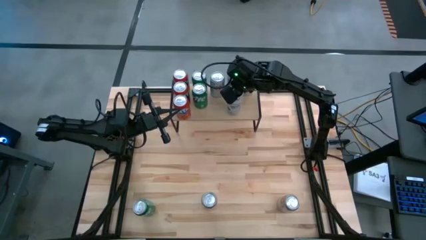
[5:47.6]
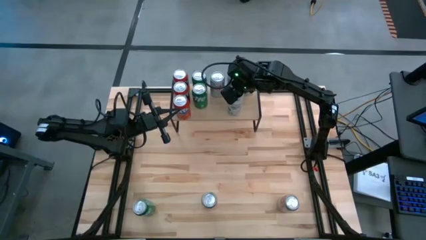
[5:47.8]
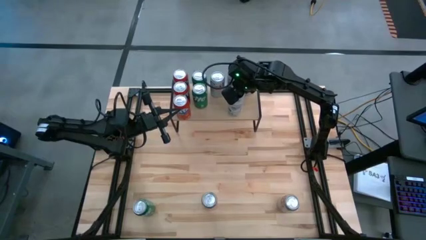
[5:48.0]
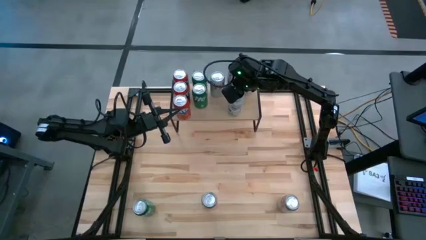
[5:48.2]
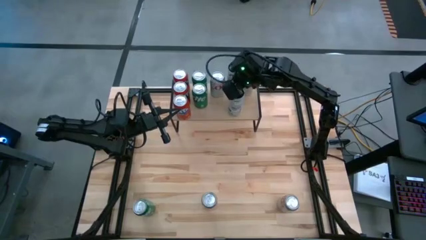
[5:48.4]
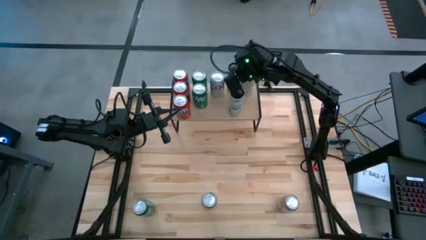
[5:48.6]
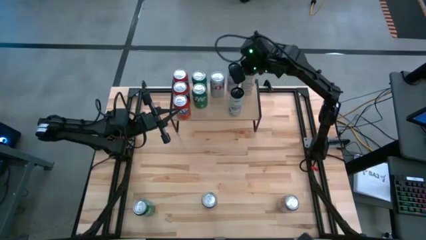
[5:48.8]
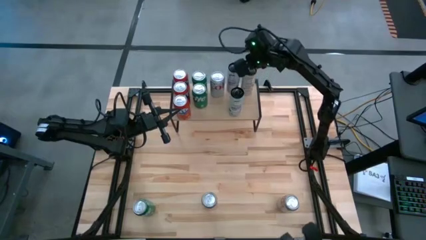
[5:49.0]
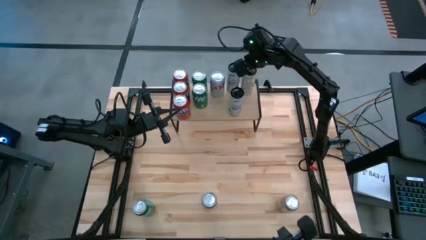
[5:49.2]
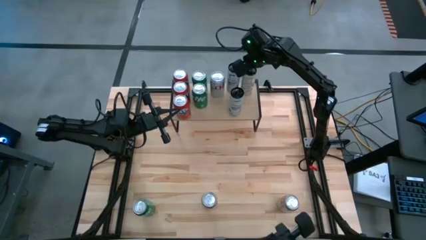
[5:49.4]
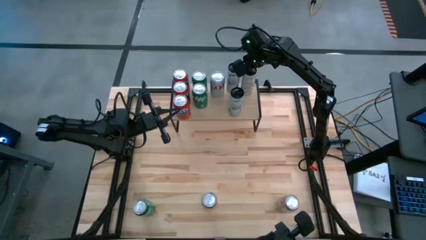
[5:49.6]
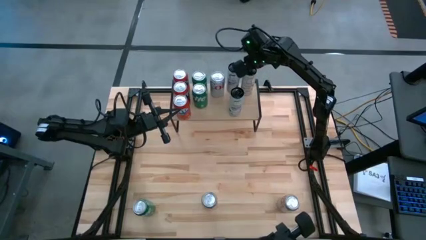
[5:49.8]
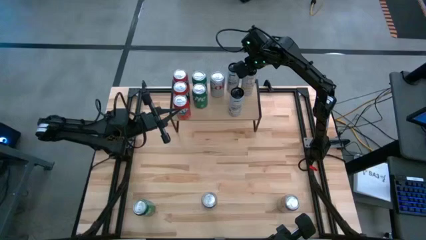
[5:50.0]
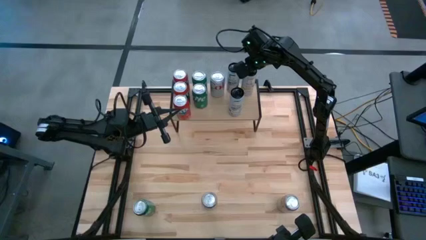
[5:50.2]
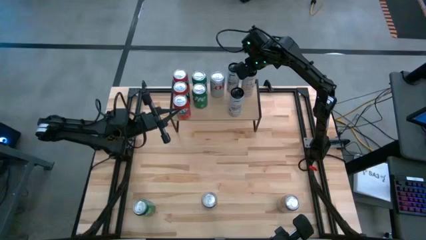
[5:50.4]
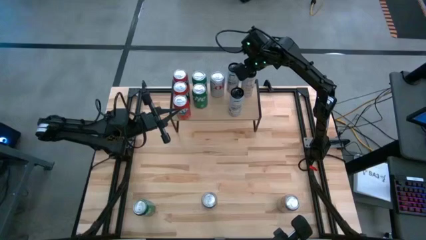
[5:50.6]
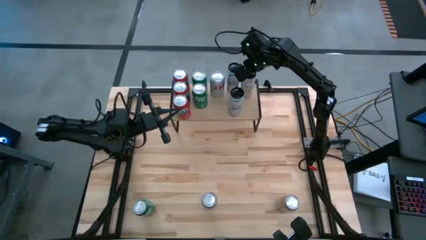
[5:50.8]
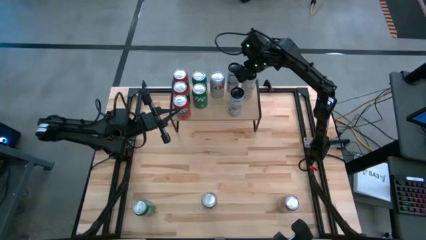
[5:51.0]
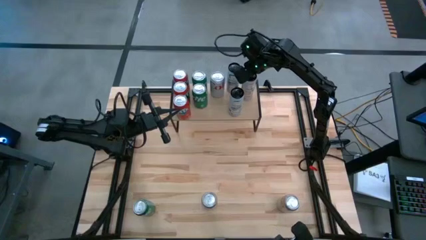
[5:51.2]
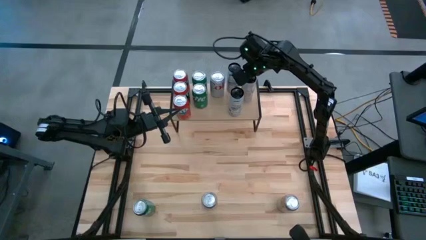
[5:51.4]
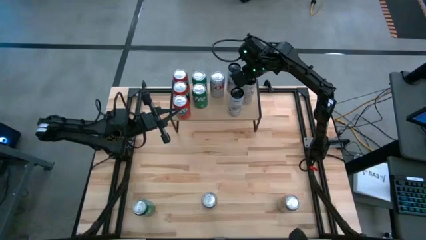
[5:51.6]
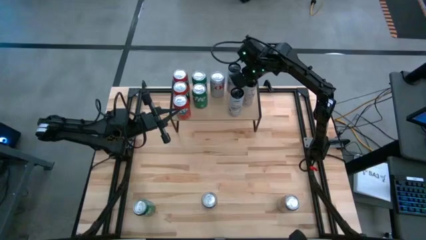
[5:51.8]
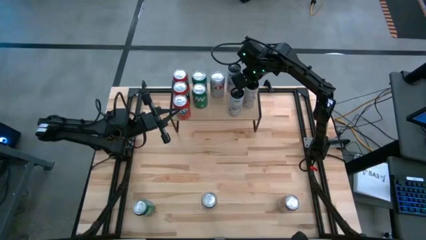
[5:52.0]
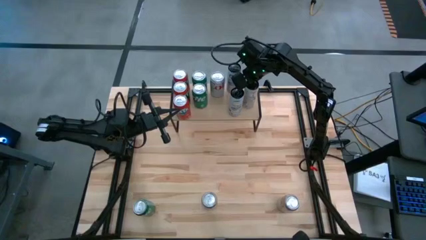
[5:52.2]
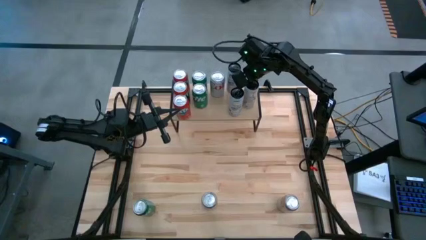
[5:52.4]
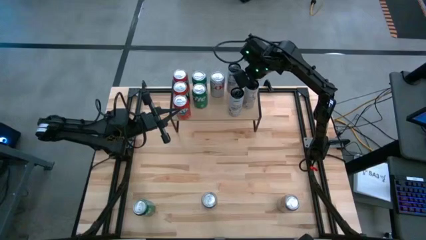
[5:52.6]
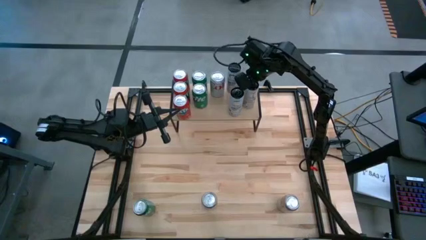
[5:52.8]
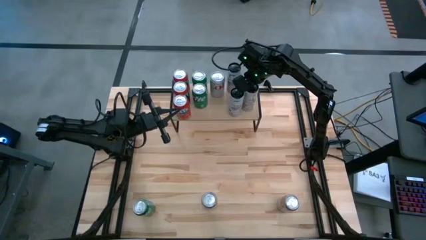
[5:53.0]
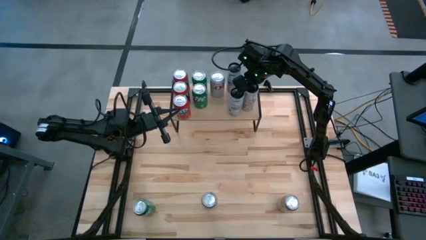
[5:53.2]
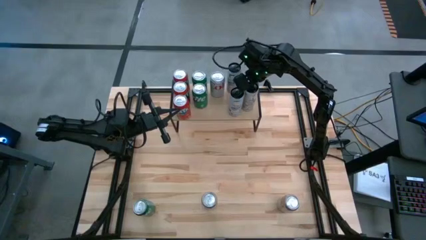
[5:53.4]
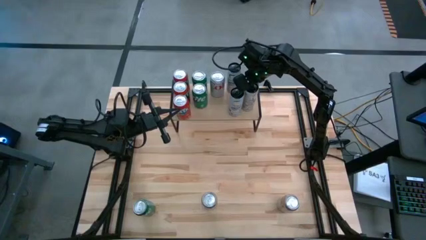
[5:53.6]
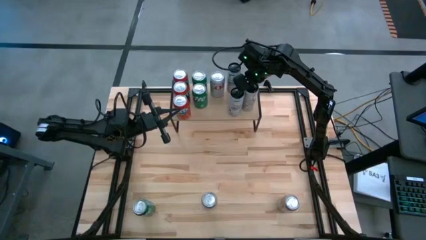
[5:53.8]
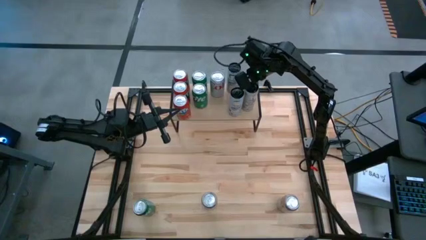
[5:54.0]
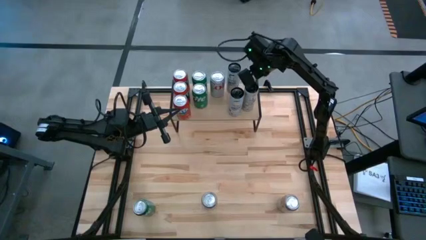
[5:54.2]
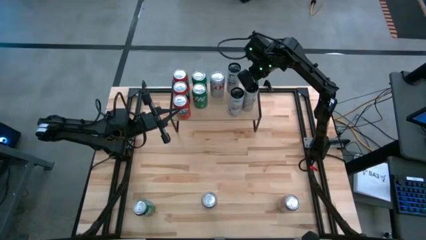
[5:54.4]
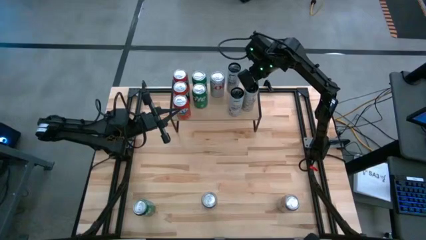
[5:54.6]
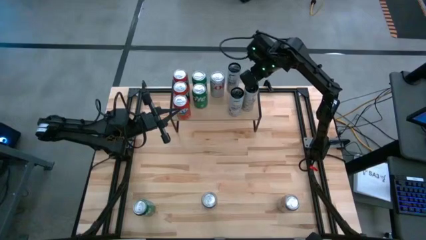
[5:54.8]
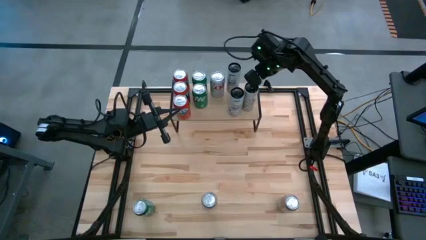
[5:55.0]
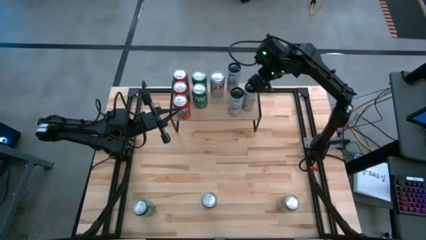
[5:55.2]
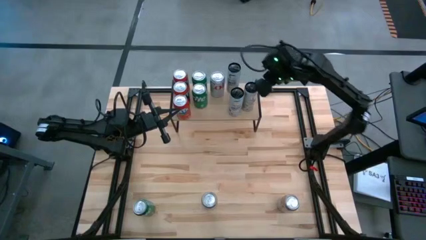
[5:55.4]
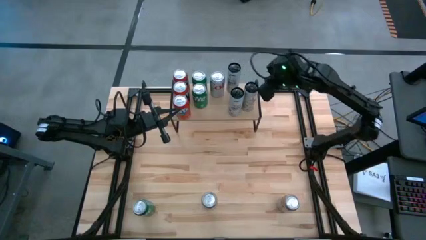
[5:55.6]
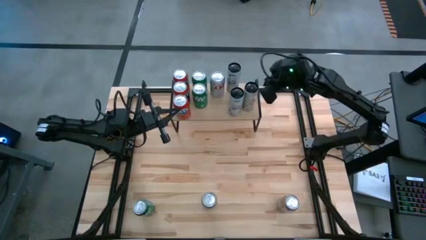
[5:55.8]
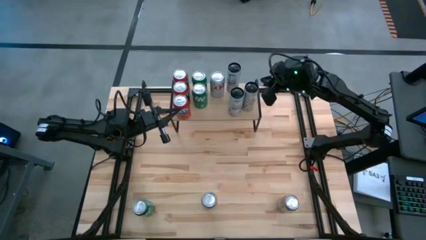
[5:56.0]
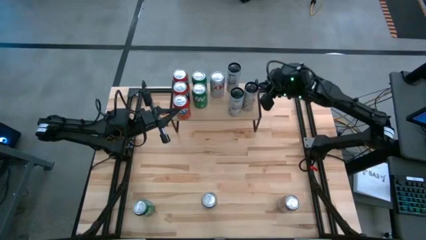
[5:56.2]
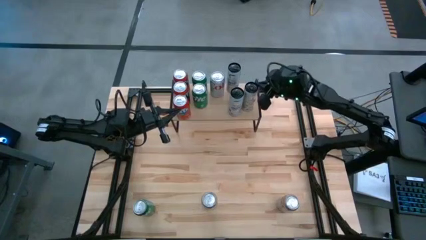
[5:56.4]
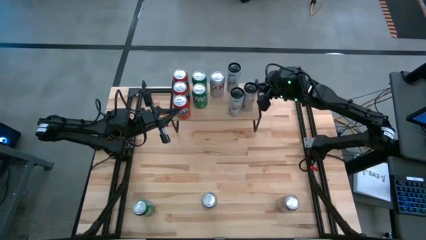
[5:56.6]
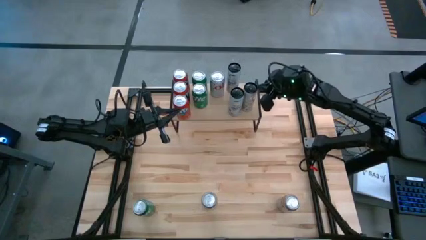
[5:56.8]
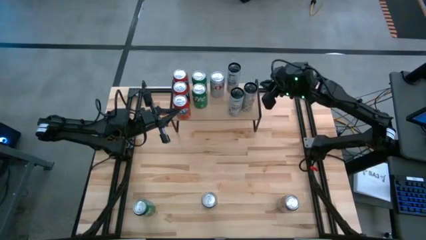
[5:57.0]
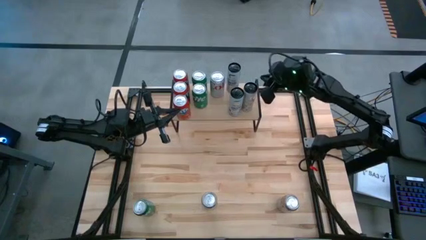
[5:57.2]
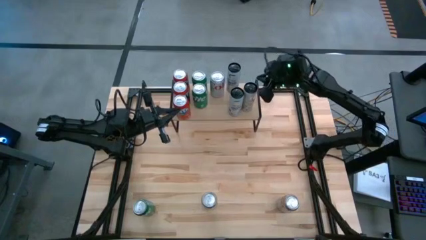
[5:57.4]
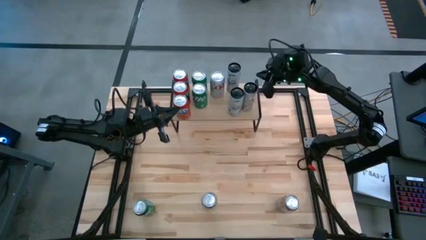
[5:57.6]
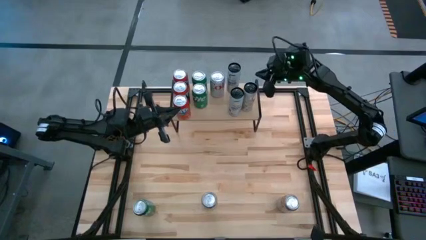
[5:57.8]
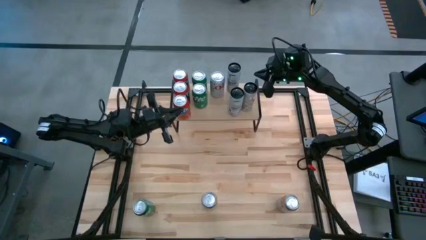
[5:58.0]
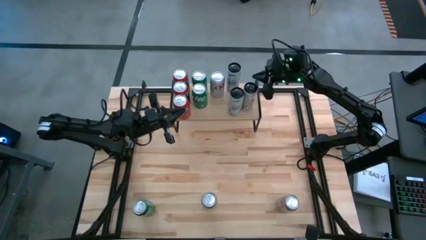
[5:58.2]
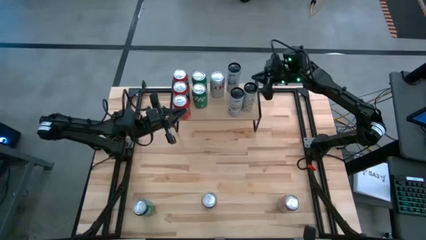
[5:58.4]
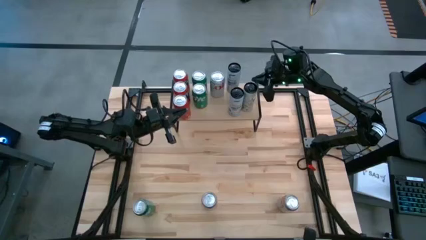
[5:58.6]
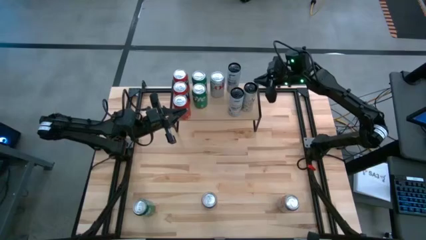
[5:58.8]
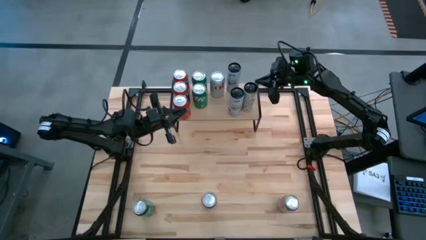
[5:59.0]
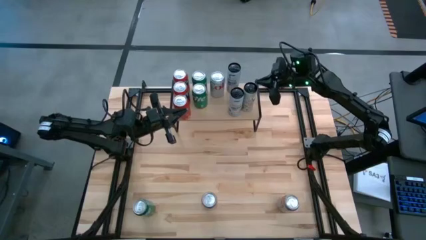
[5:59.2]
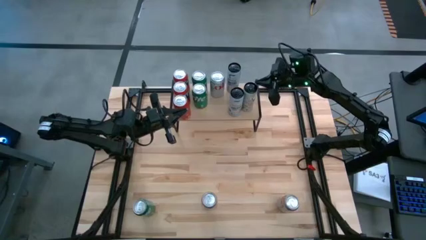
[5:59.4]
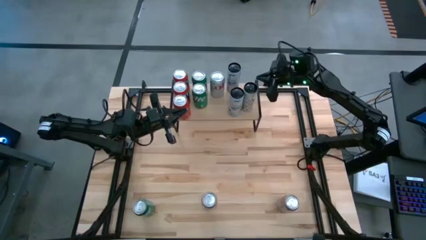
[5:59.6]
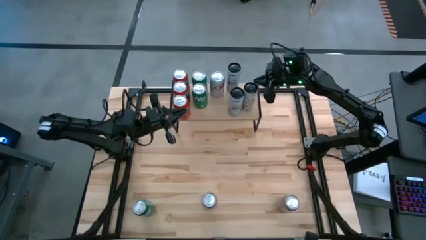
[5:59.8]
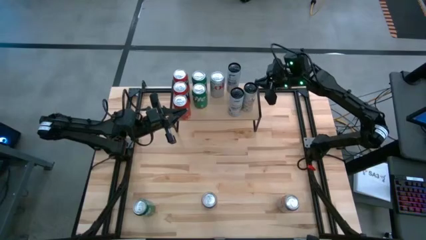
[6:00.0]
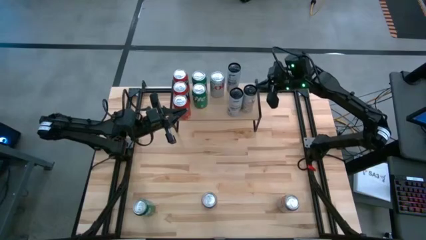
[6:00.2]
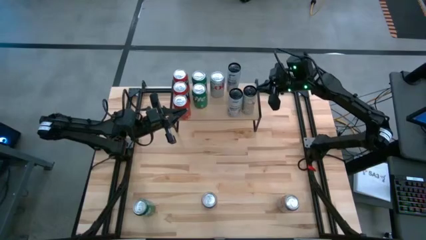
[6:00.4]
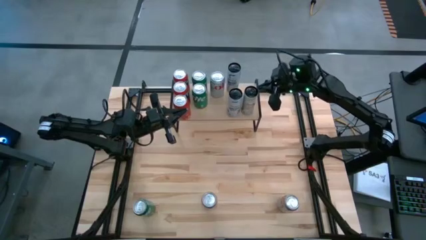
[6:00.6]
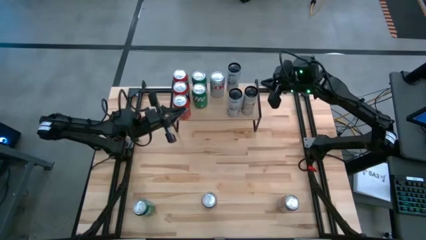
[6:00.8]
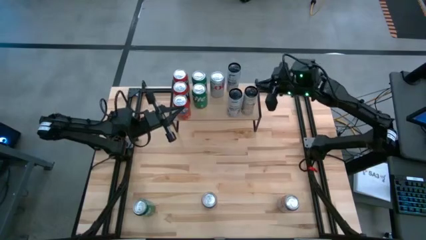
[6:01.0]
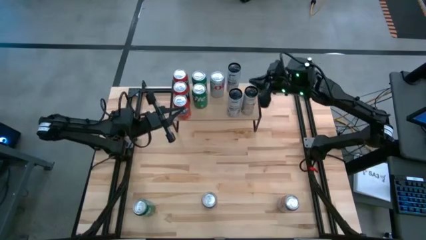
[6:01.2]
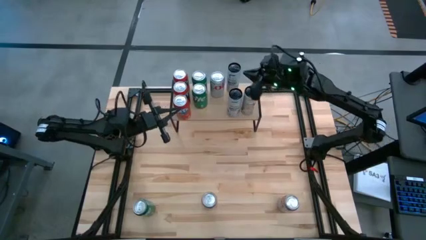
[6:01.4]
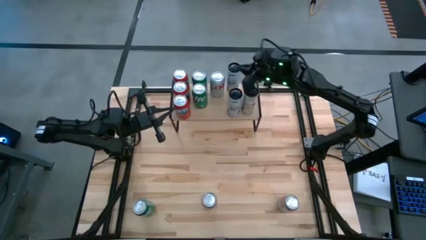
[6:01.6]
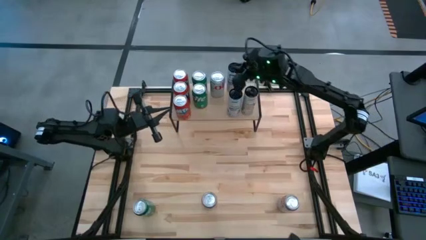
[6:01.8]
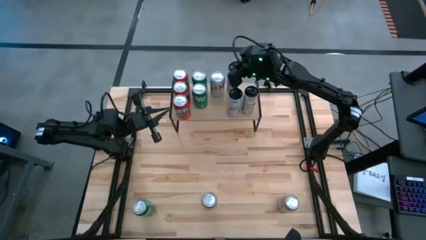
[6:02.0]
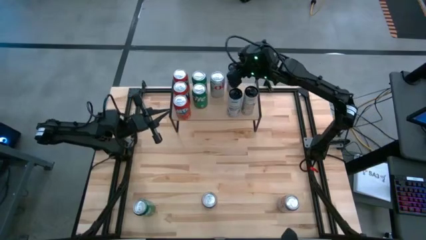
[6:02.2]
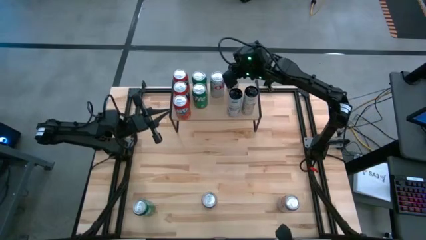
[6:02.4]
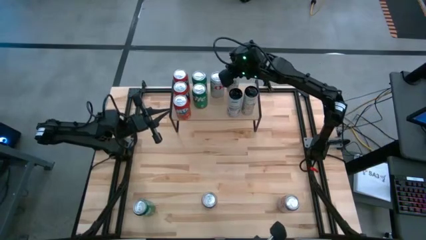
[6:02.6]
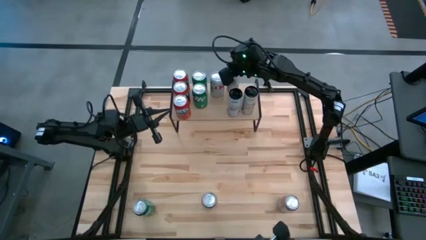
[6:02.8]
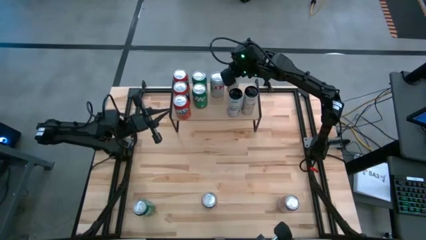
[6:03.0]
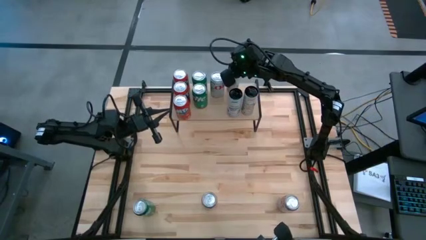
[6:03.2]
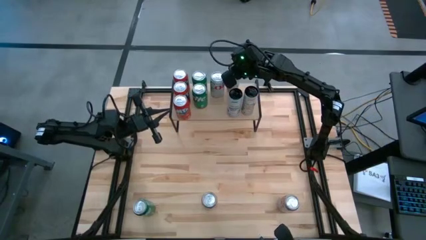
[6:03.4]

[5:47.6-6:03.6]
Task: Place canned beverage on shelf
Adjust the soda cans on the shelf

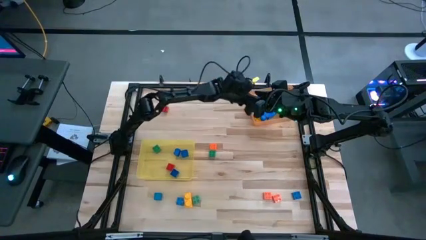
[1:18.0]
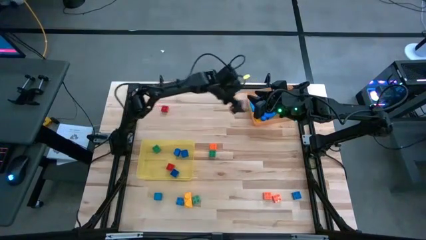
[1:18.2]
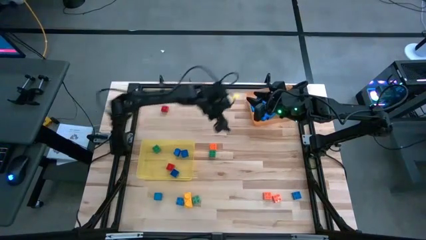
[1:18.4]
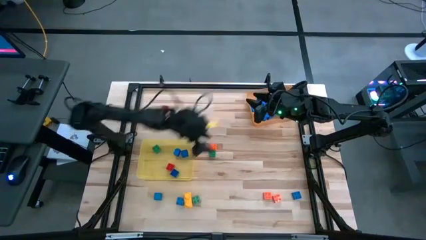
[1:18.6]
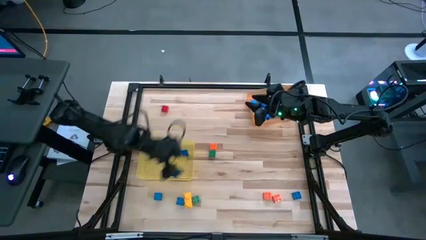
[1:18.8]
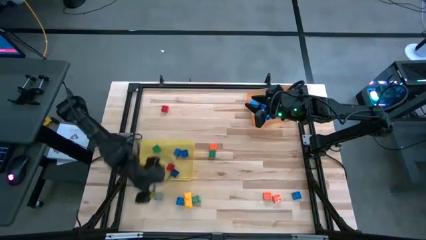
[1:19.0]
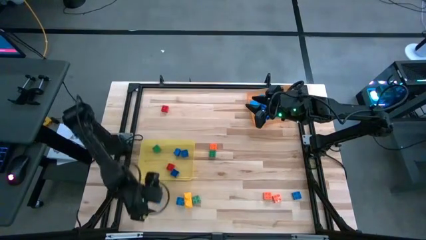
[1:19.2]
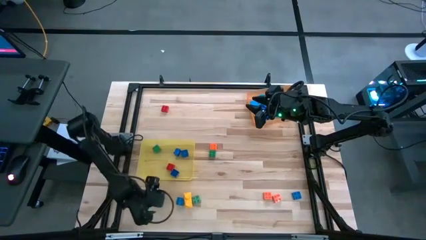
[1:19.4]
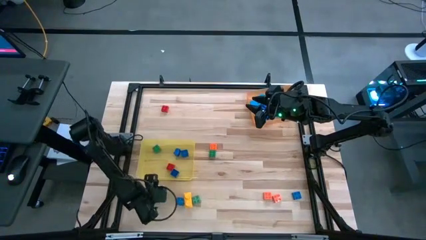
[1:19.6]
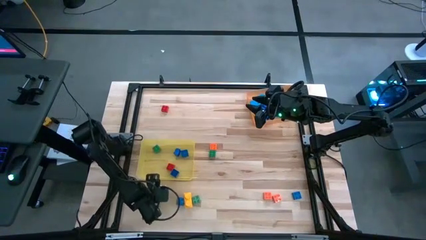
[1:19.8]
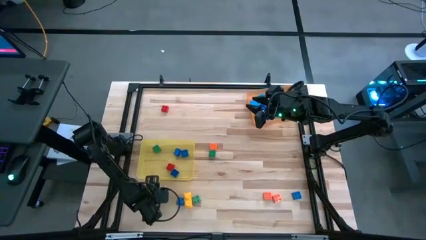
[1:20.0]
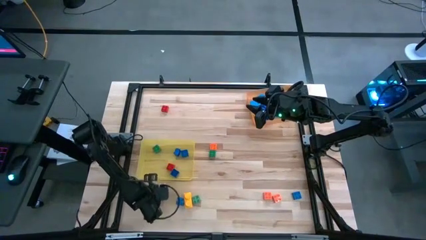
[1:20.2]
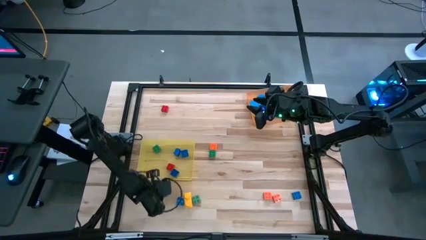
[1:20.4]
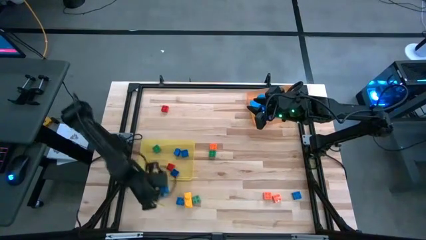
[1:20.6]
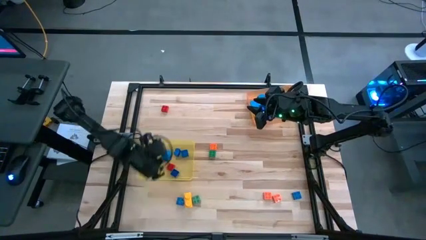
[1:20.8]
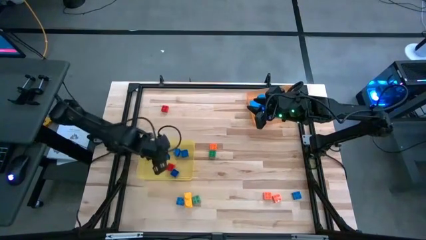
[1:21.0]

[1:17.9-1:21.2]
Task: Sort blocks by size
Put the small blue block into the yellow bin
